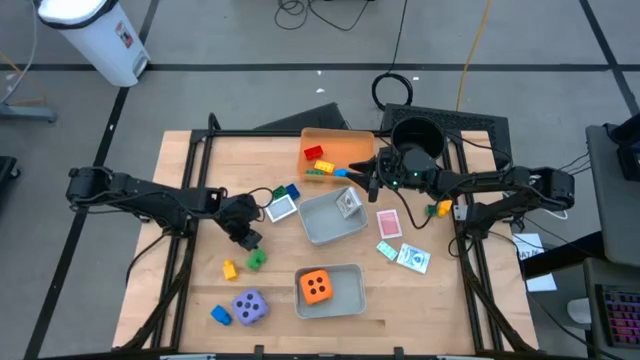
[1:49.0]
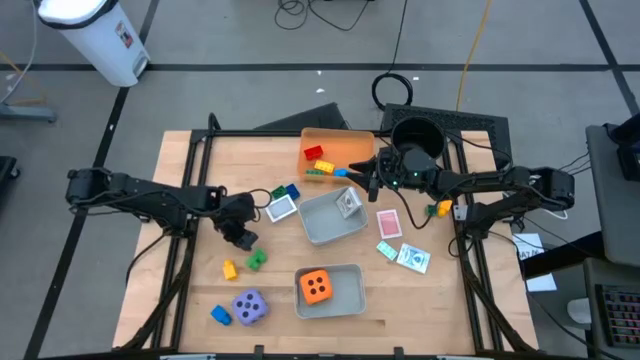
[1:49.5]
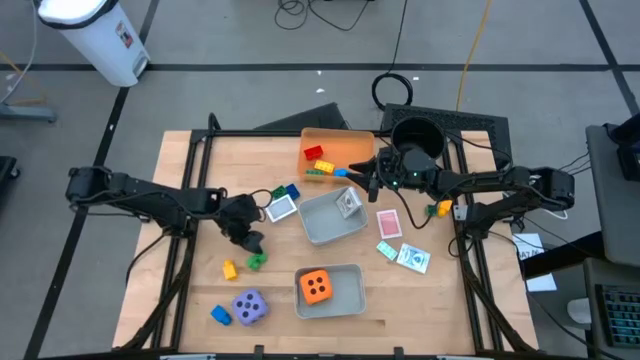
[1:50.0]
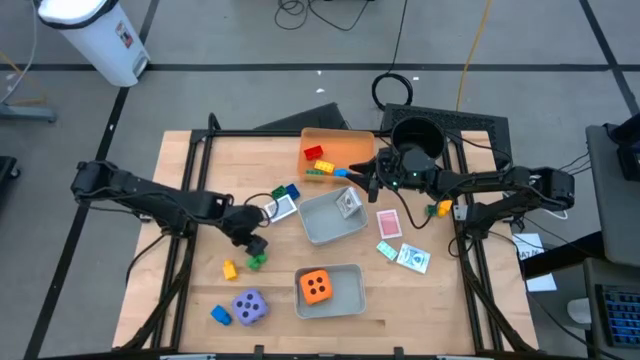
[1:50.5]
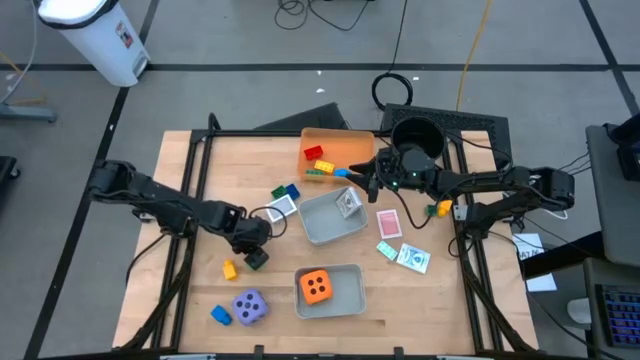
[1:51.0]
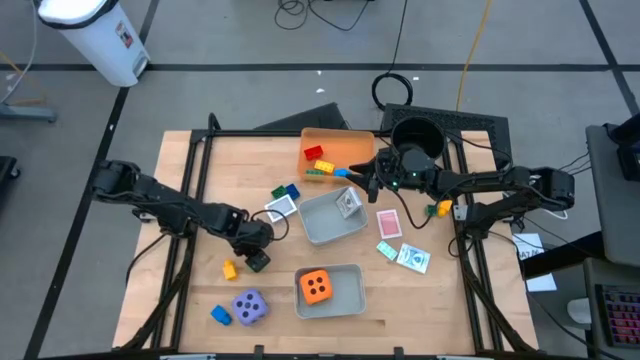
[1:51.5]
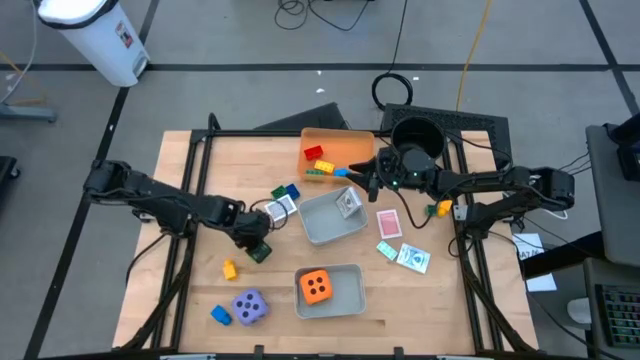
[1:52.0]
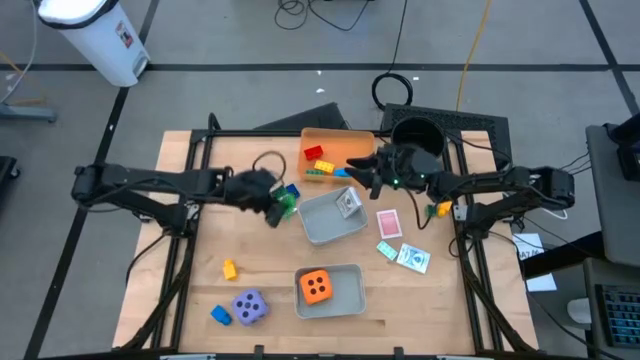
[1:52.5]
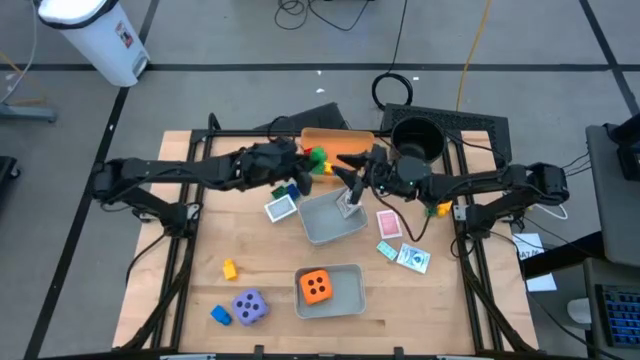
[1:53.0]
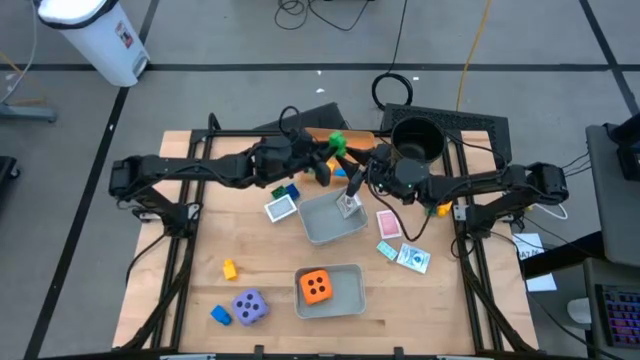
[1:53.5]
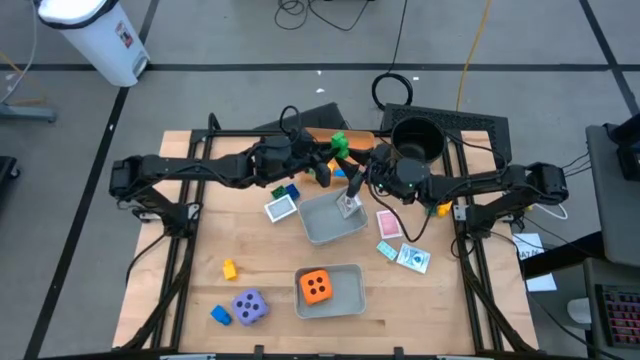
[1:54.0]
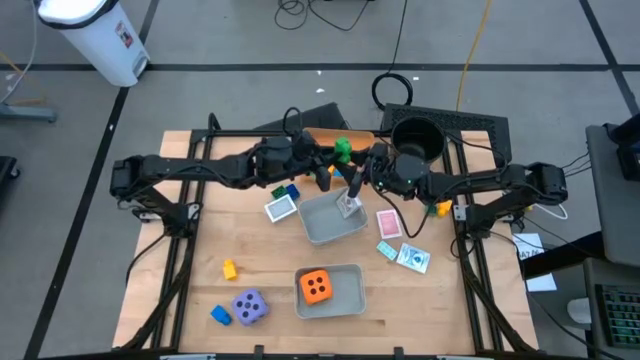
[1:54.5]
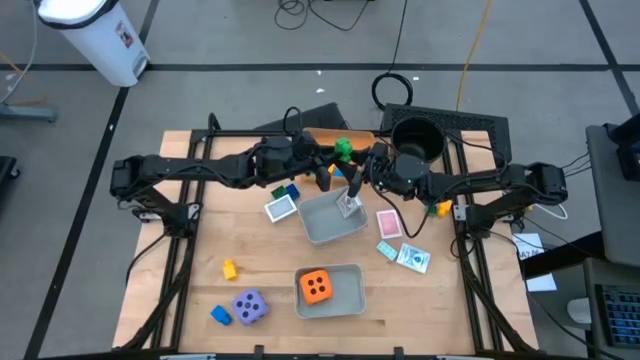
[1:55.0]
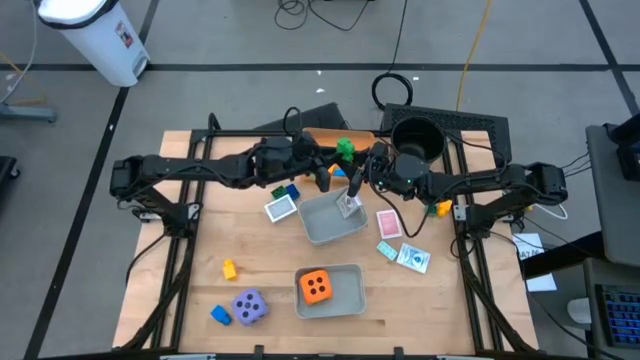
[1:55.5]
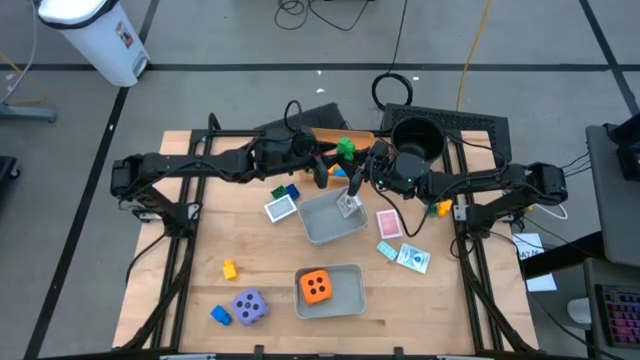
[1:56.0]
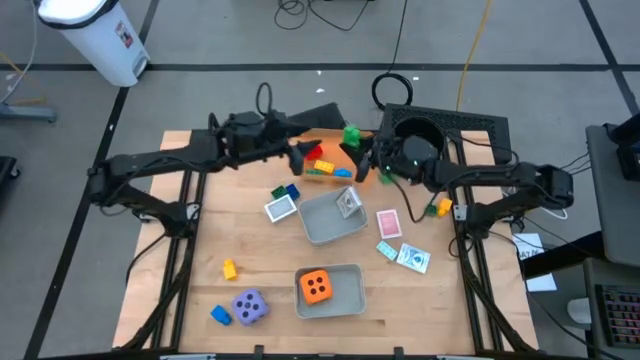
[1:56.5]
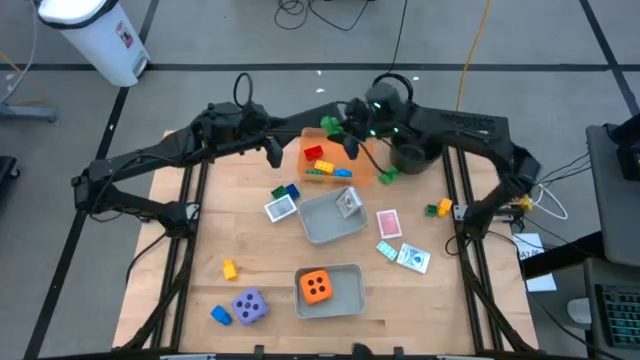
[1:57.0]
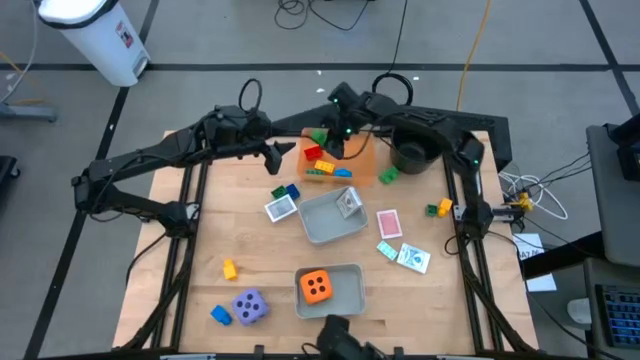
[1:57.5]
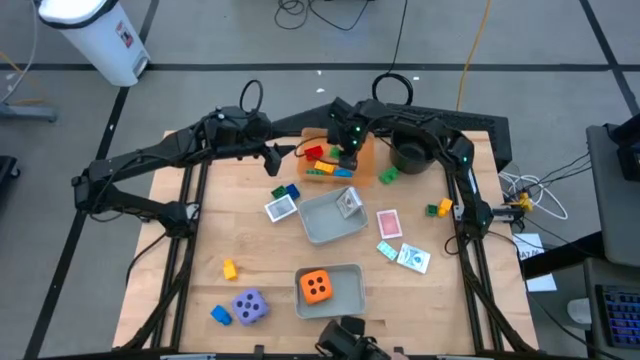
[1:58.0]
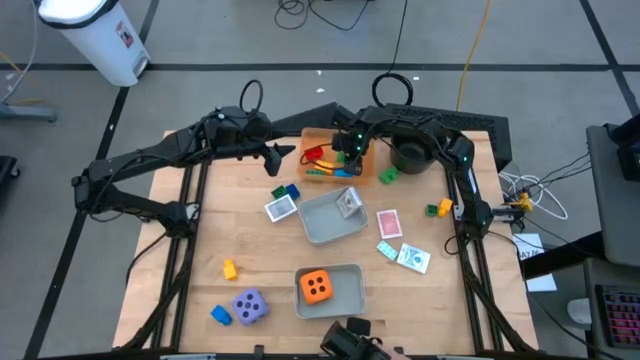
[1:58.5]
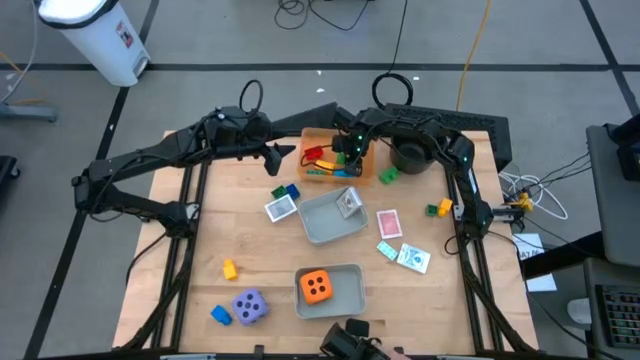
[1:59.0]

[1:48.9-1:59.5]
Task: Pick & Place Toys
Put the green game piece into the orange bin

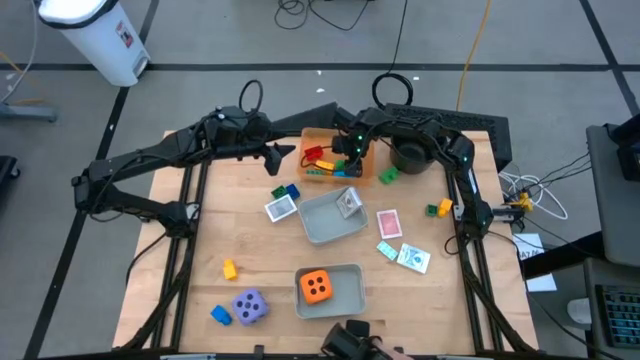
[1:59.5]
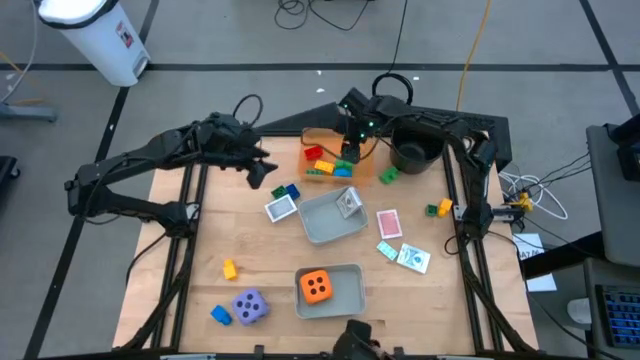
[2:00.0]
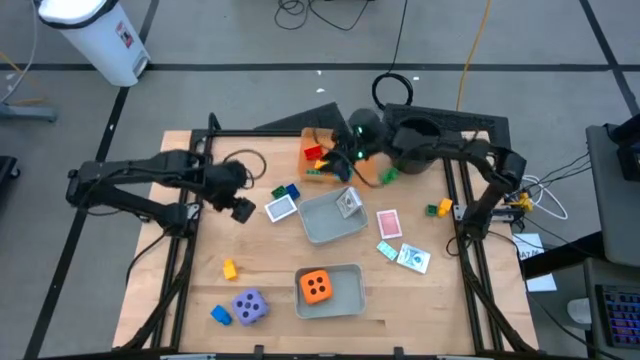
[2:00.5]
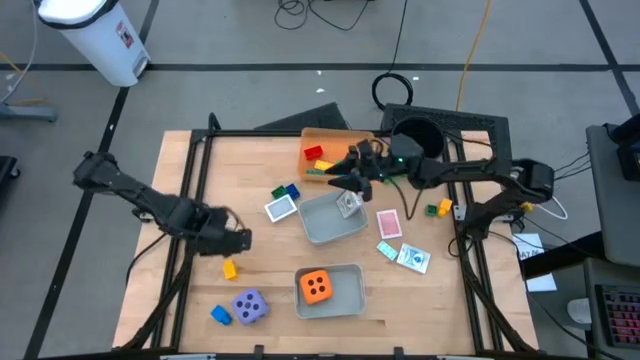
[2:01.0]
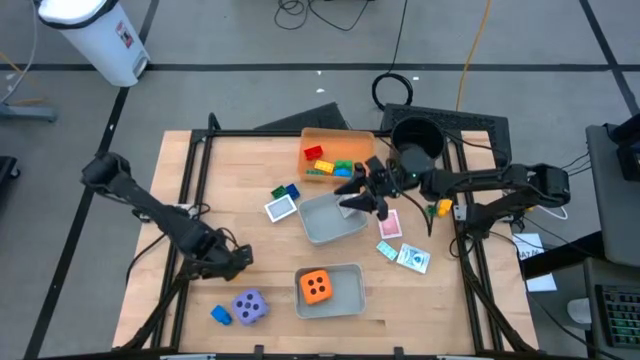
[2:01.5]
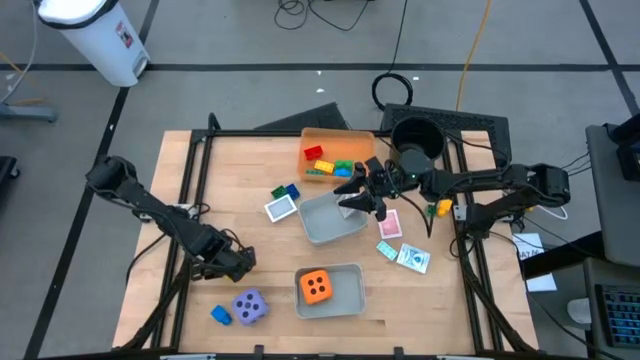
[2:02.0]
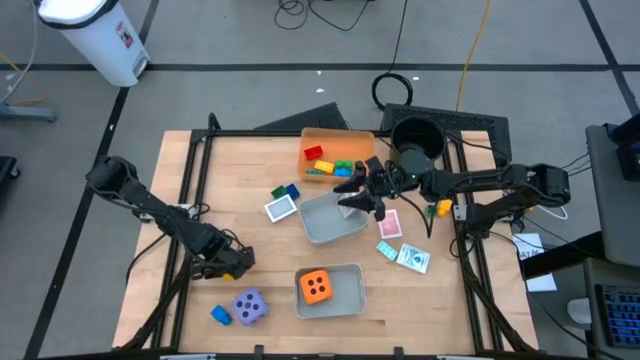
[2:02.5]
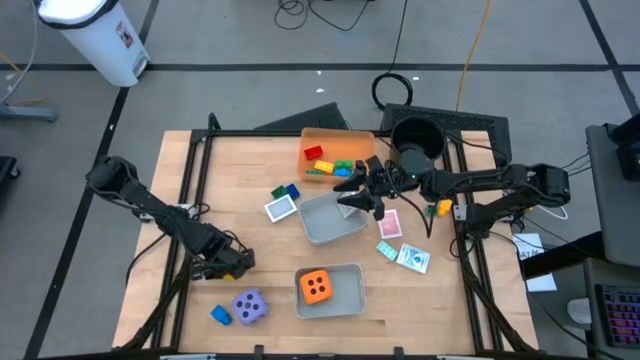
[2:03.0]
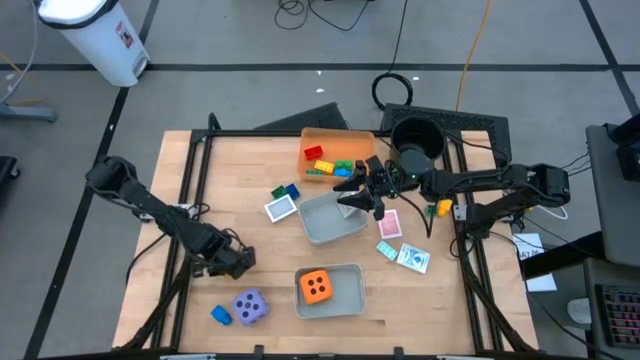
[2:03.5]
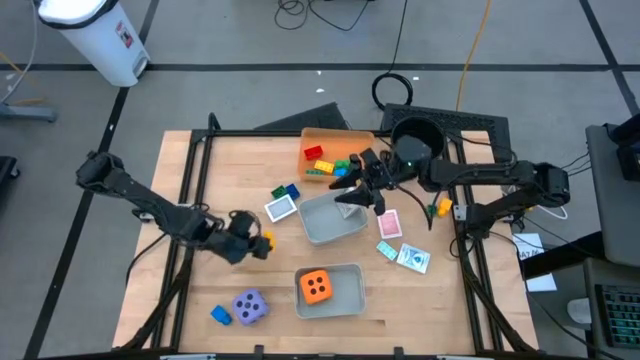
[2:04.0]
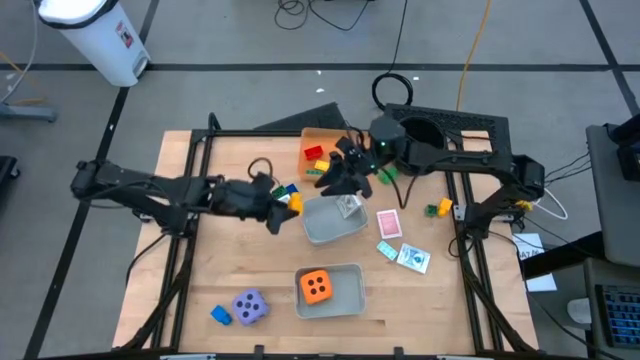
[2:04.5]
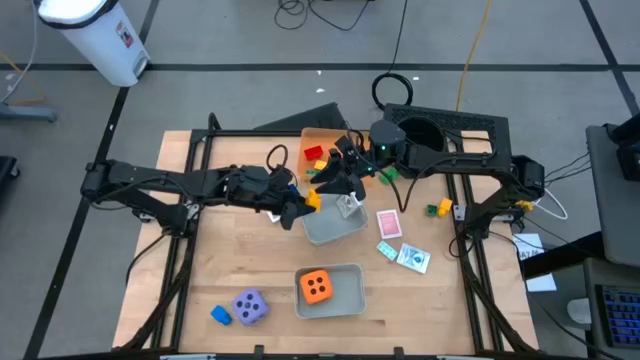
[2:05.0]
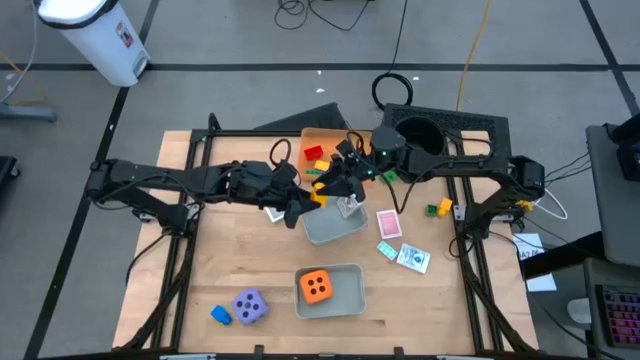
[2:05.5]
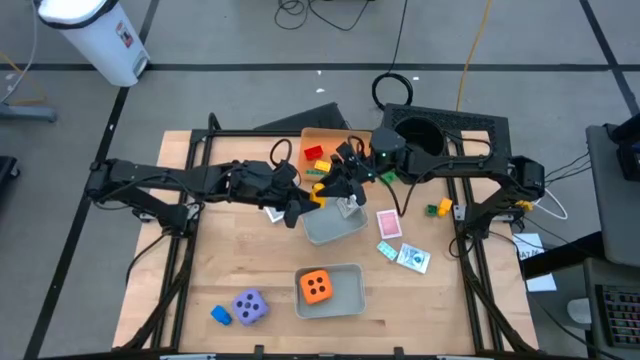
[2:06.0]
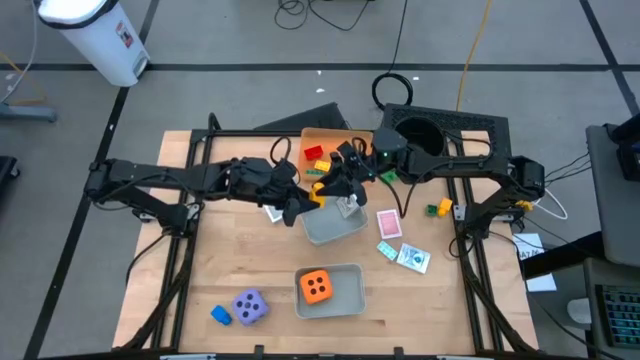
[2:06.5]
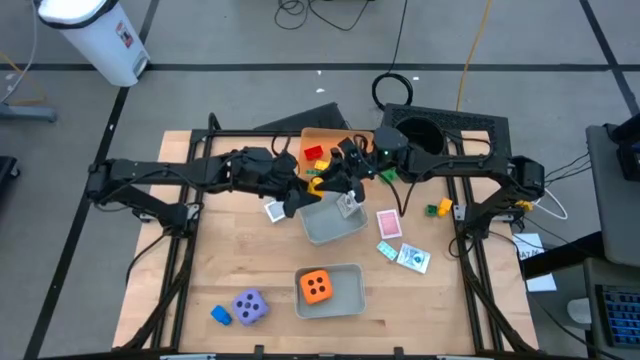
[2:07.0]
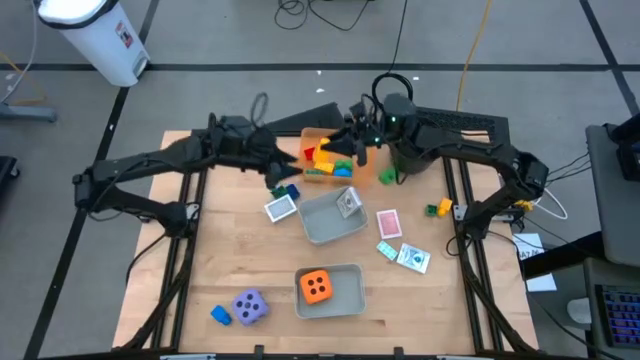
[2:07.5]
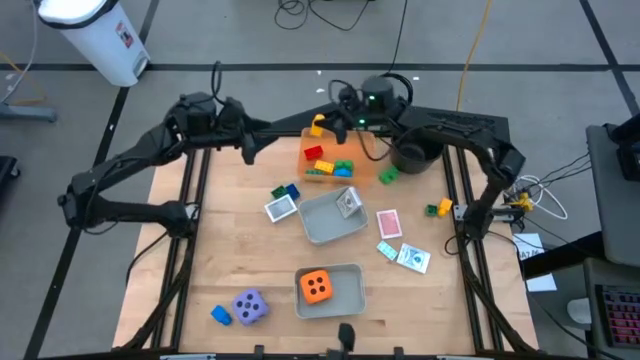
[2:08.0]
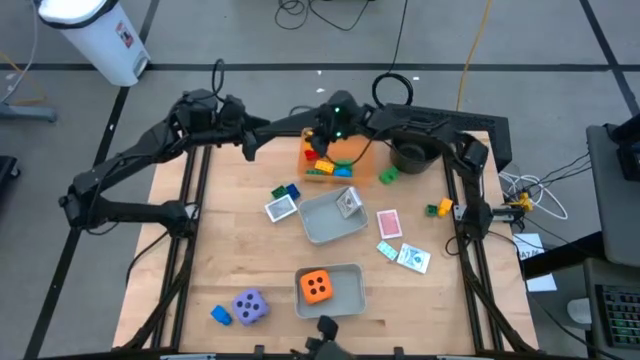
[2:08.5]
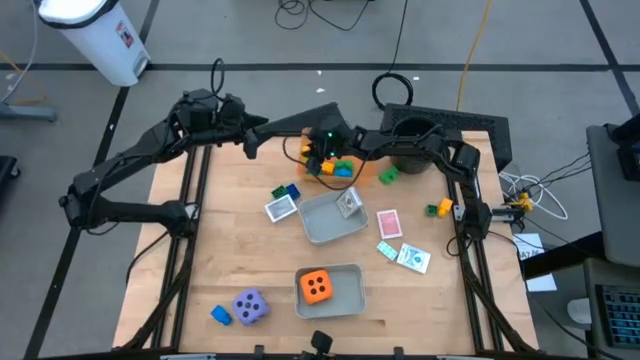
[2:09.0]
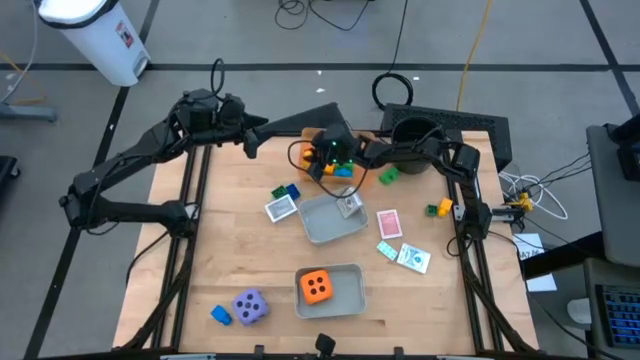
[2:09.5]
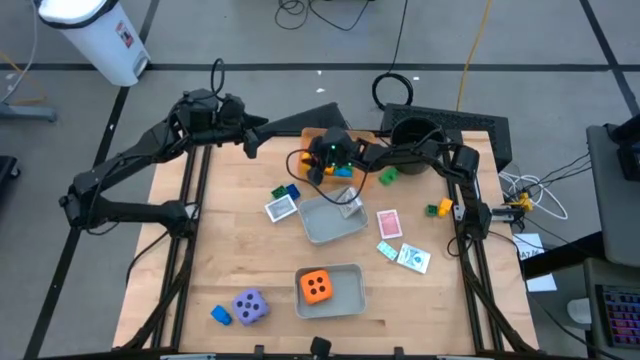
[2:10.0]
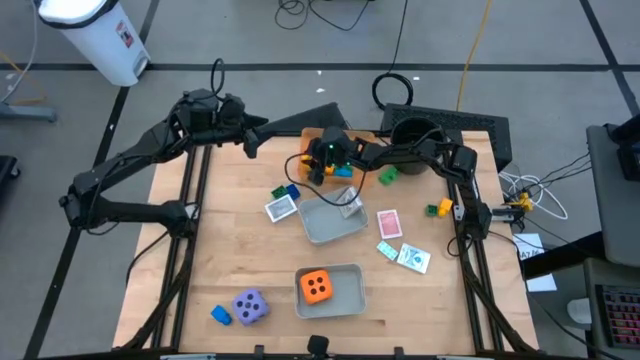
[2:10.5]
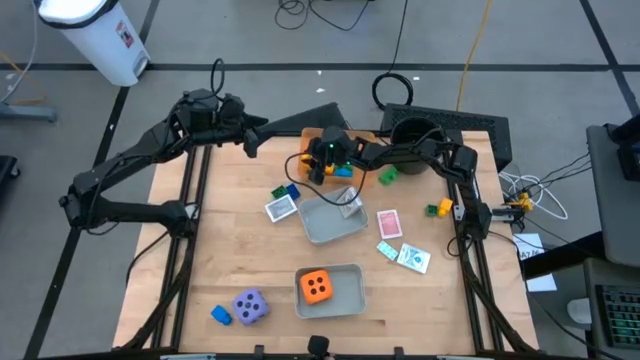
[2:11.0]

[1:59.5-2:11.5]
Put the yellow game piece into the orange bin
